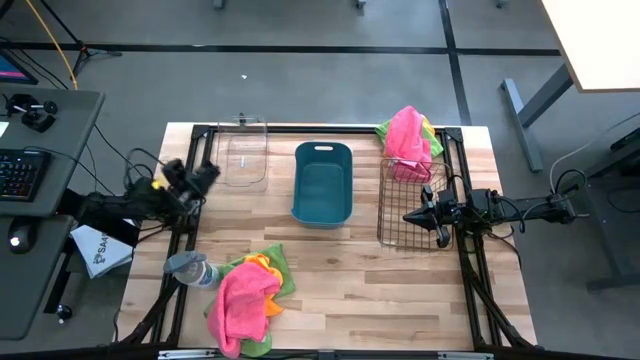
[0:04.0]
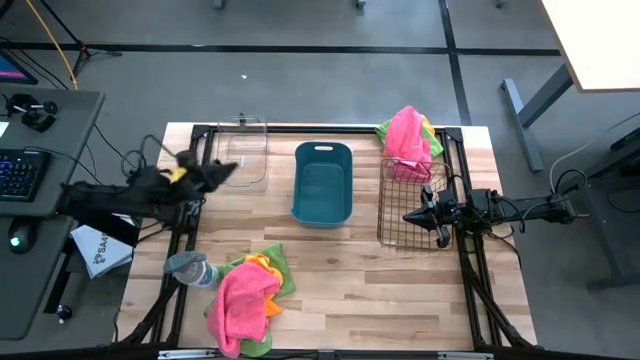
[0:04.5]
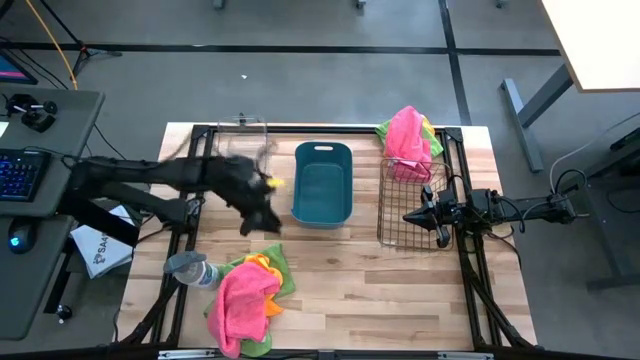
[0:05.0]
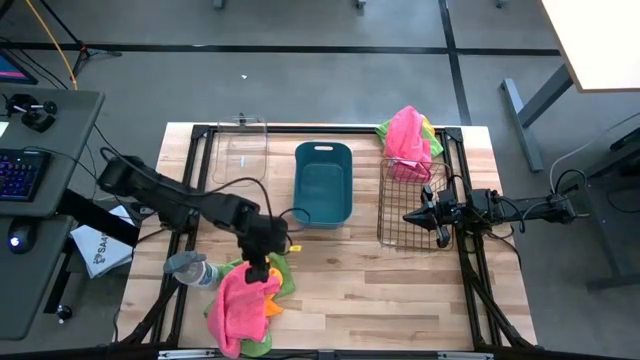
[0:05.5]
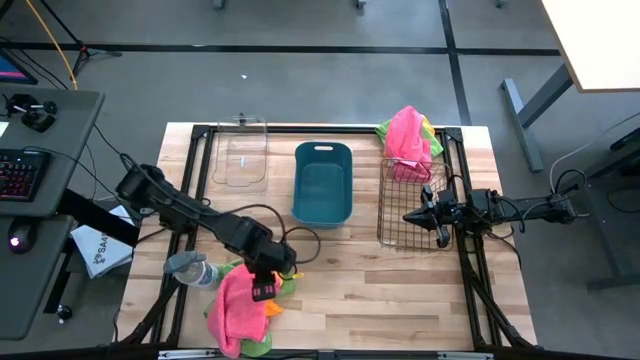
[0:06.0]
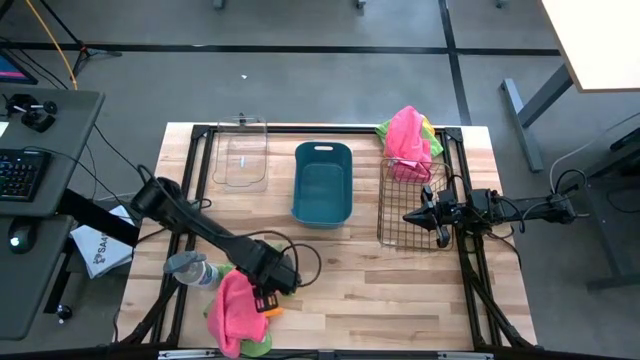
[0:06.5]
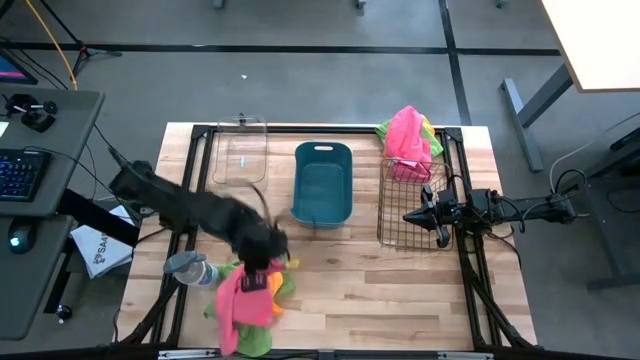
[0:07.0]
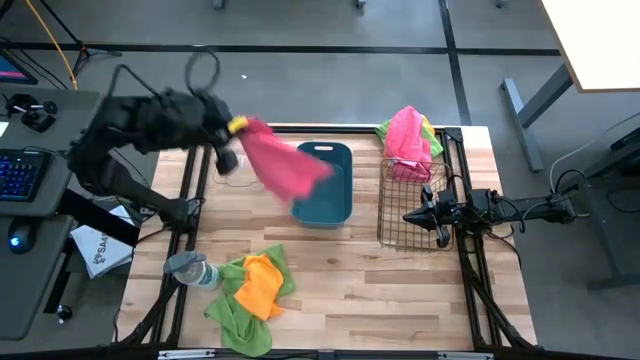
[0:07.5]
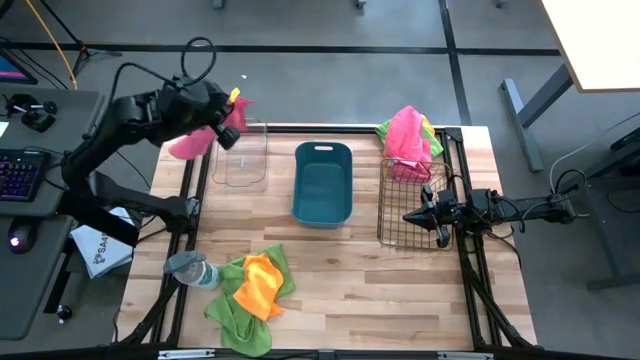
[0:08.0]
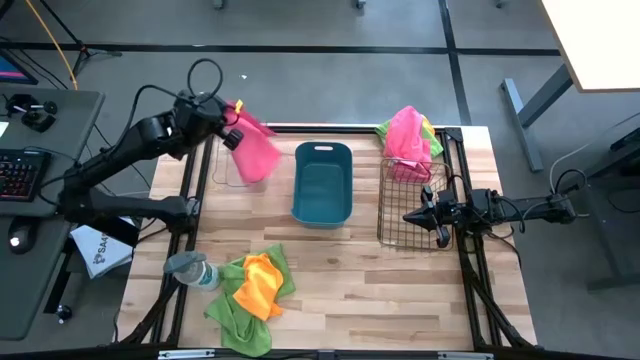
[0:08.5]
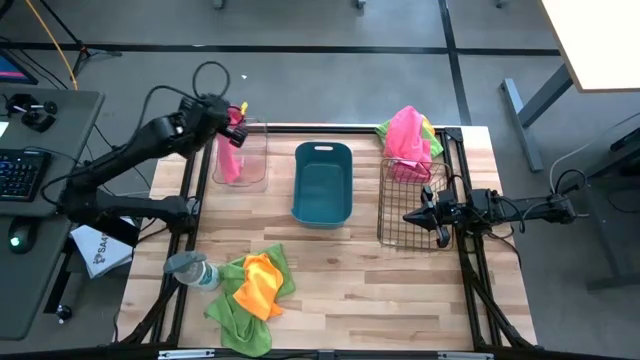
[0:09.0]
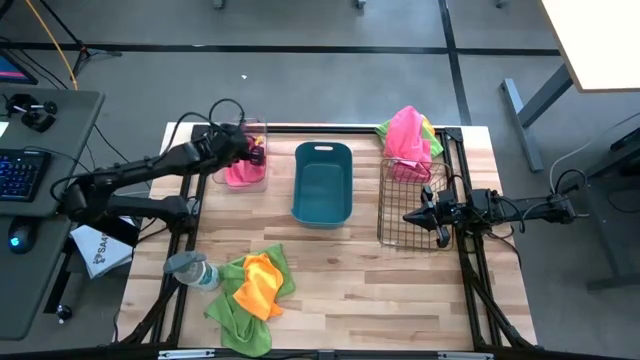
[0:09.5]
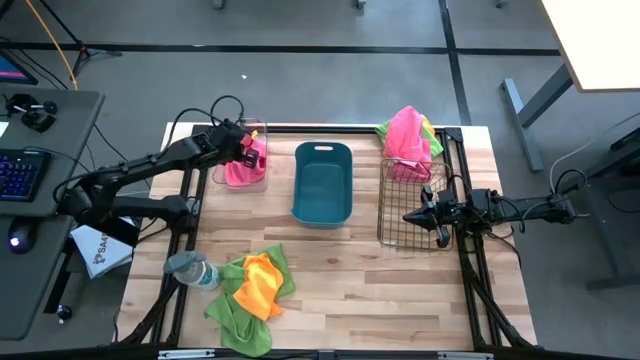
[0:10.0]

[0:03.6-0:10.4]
Task: Sort microfiber towel by color & place in baskets
Put the bottom pink towel into the transparent bin

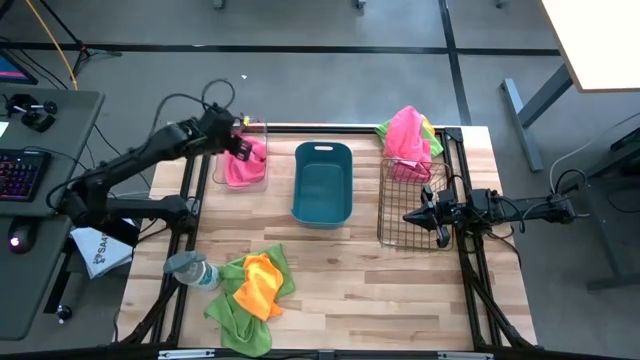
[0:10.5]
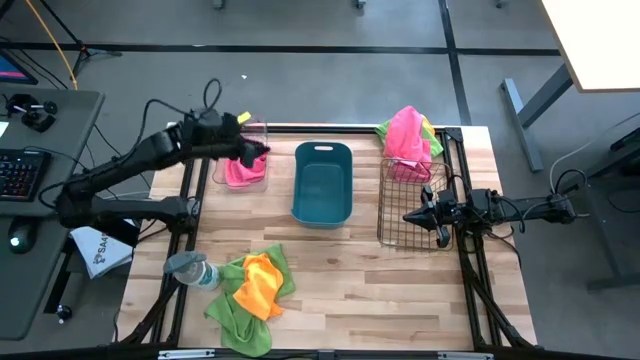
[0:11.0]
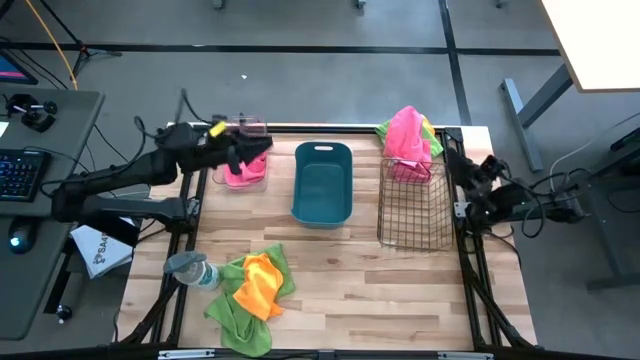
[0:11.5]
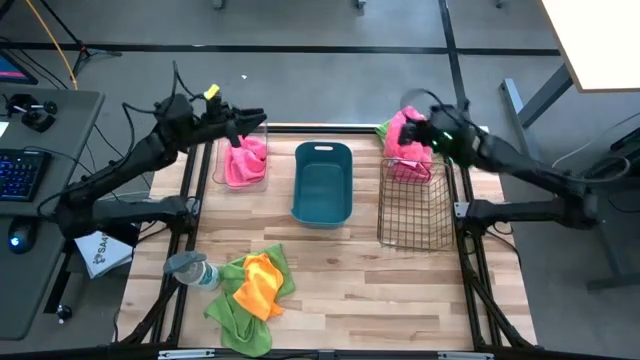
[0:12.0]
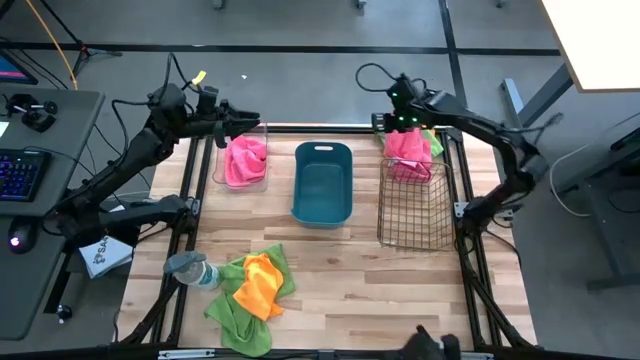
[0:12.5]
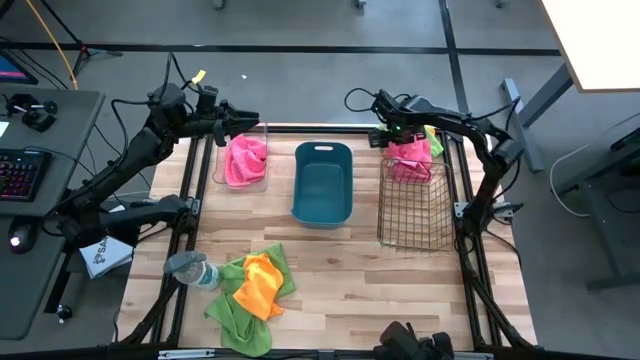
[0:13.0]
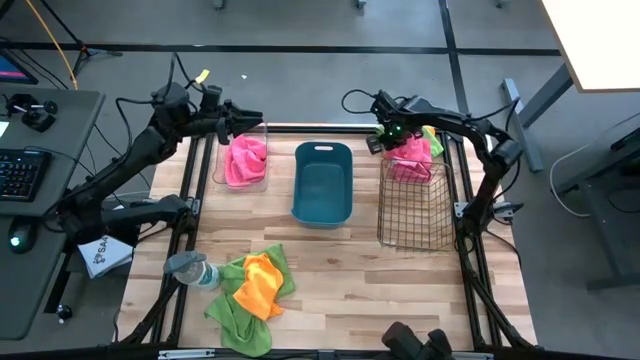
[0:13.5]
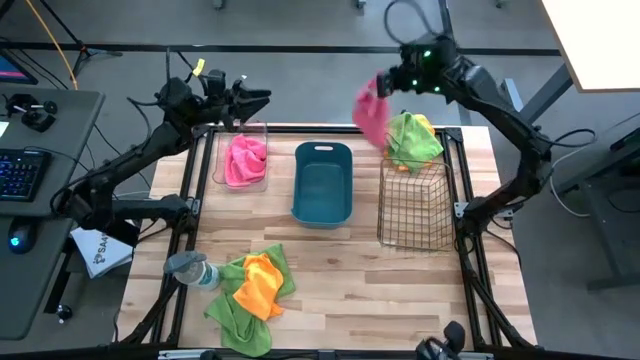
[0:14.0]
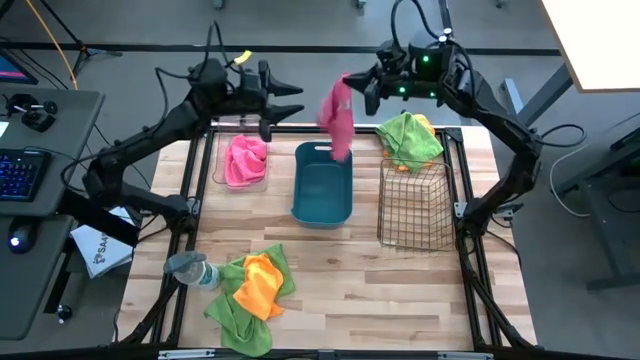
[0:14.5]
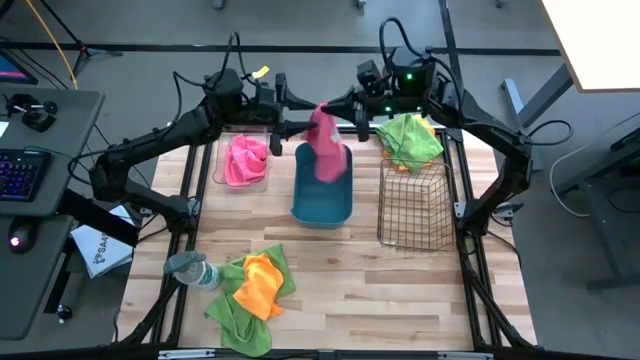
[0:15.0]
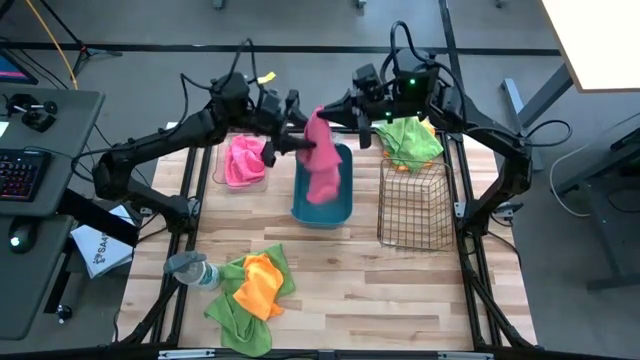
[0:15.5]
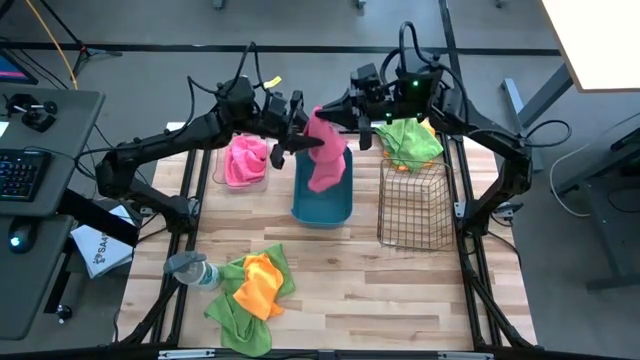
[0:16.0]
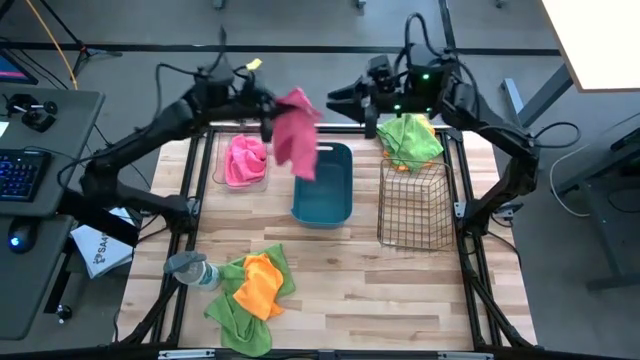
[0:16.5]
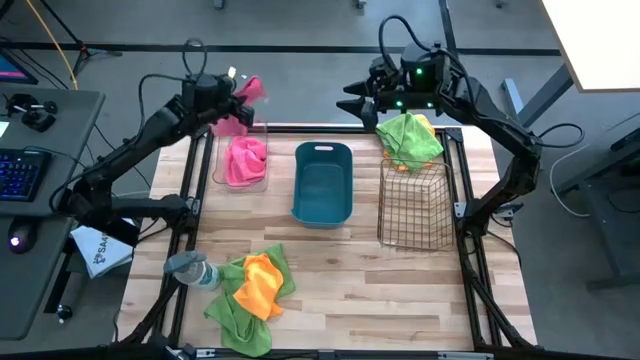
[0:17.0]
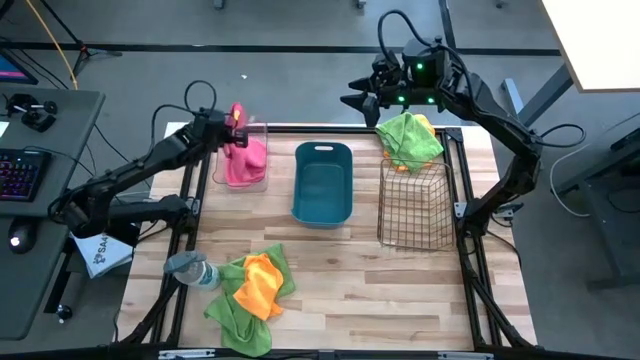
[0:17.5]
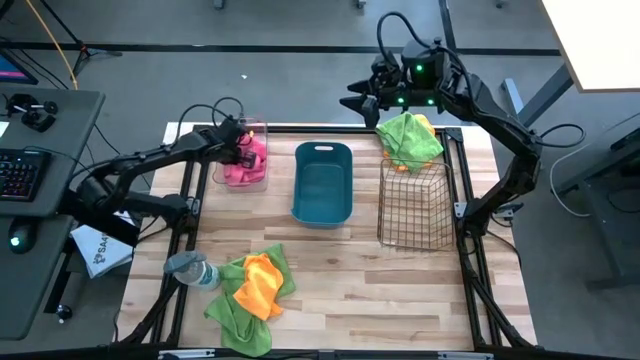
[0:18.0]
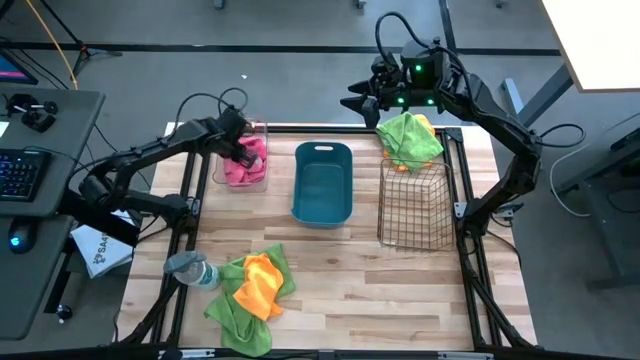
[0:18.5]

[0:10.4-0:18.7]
Put the pink towel into the transparent bin

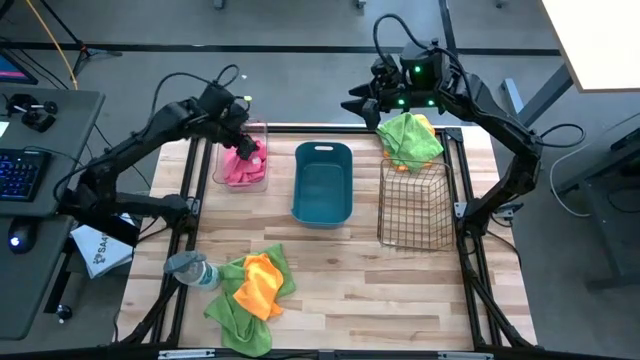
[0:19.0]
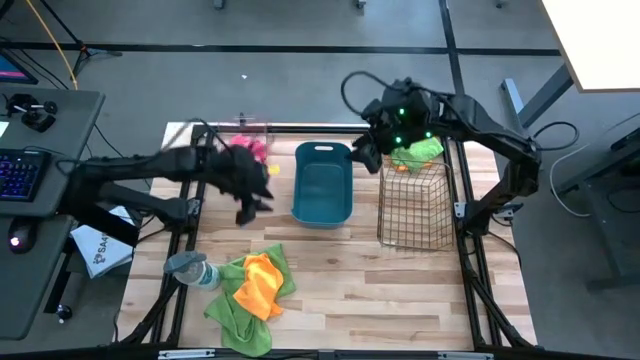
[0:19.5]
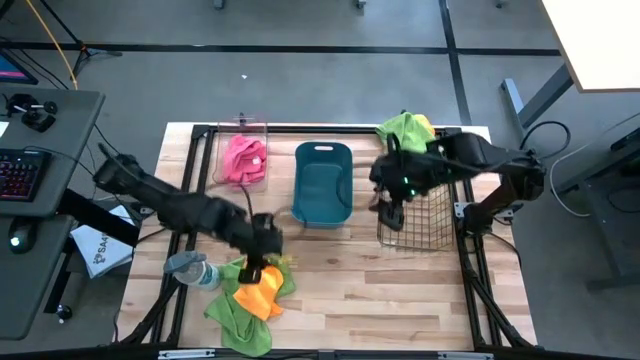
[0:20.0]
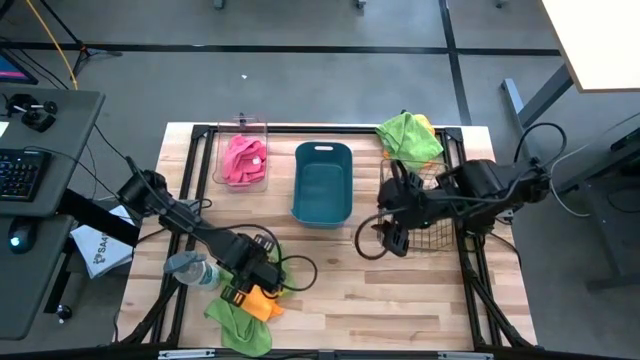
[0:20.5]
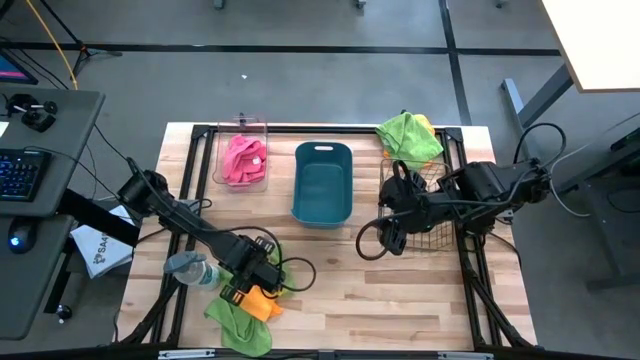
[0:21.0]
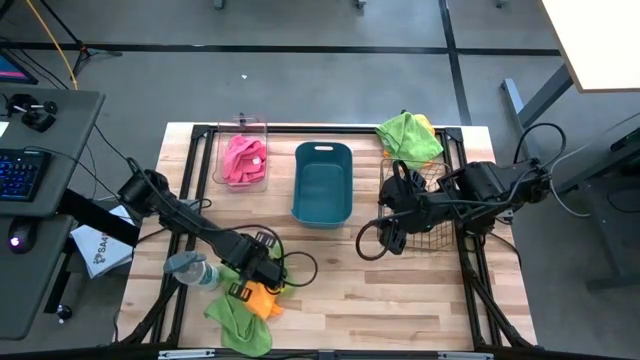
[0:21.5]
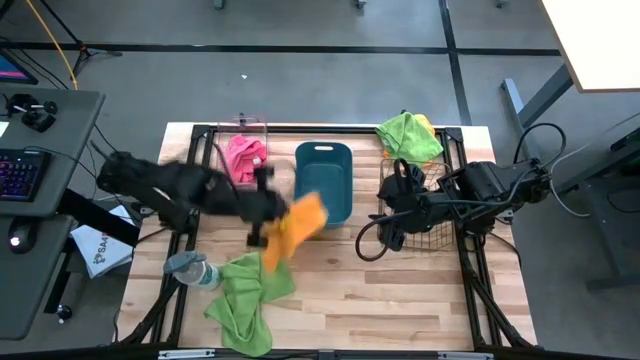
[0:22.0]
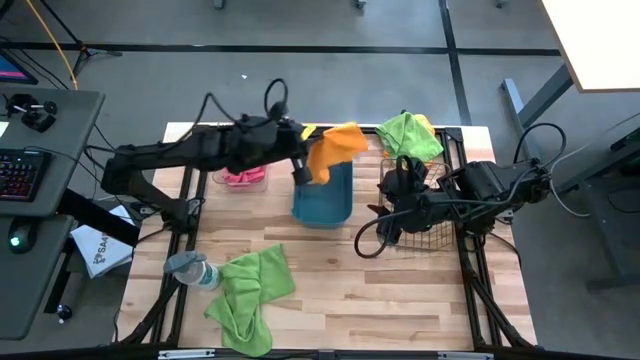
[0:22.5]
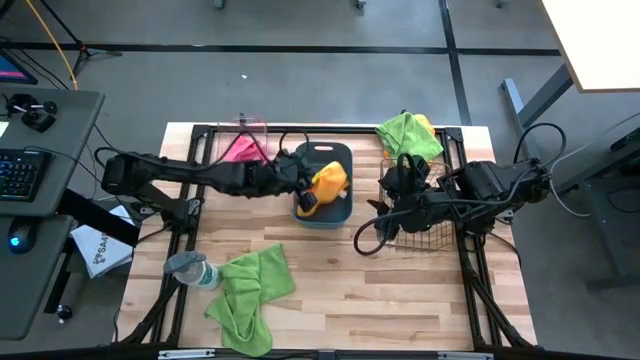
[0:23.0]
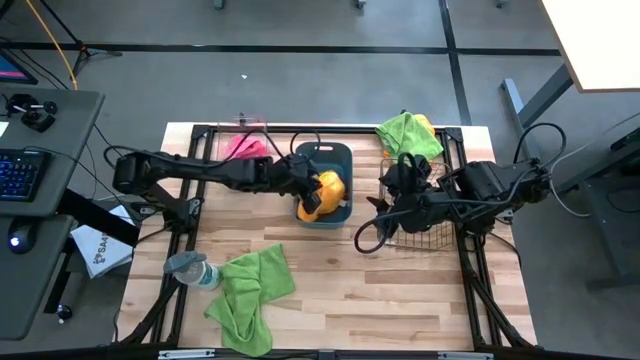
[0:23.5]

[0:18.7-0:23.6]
Put the bottom yellow towel into the blue bin

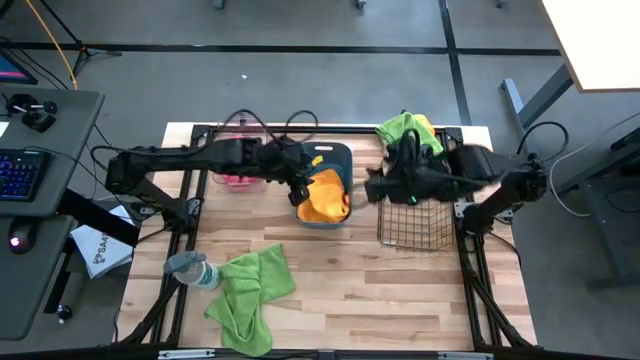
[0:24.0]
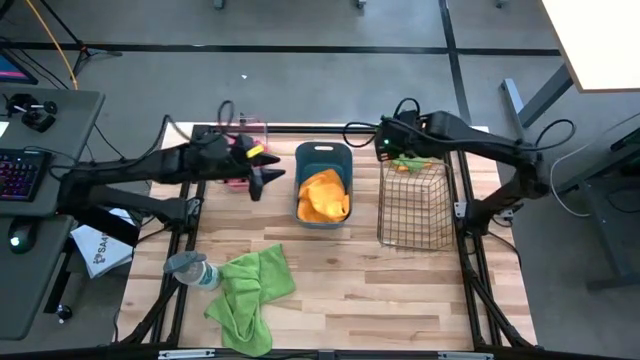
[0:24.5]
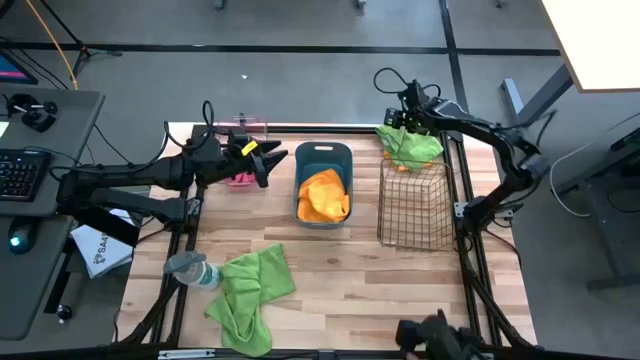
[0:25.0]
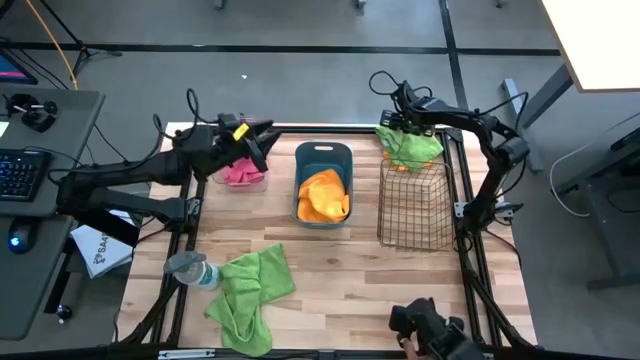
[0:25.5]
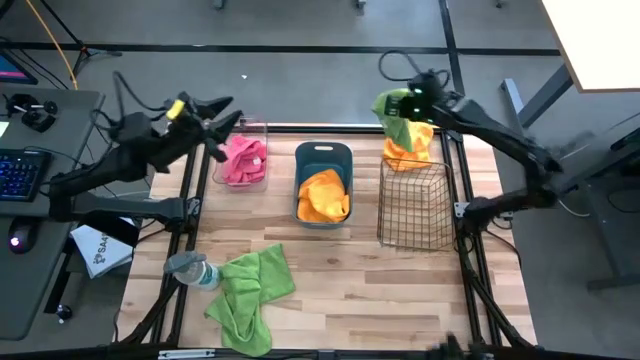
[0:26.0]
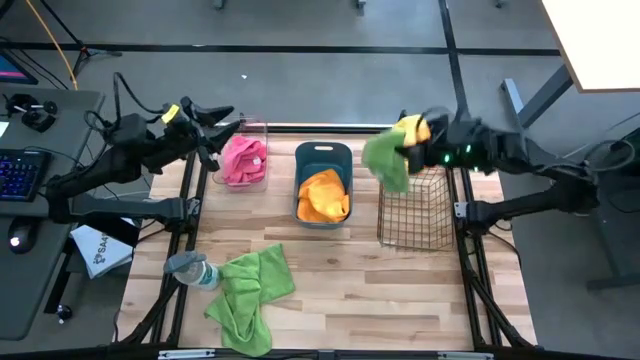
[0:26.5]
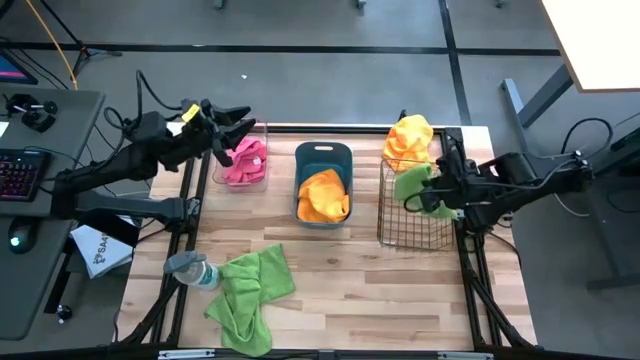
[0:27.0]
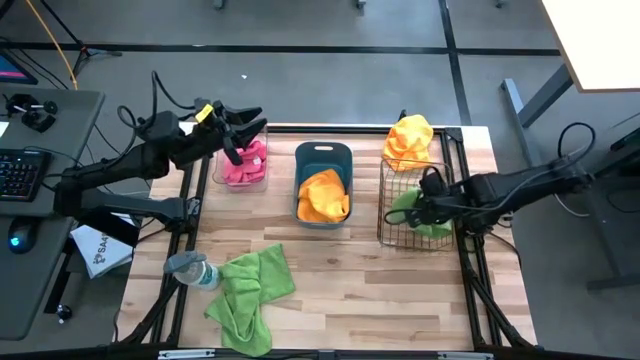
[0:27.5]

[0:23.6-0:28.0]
Put the top green towel into the gold wire basket
